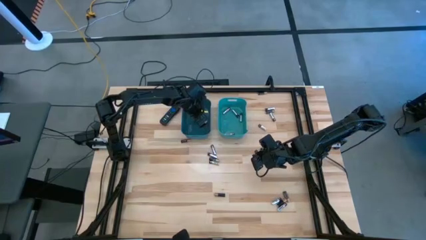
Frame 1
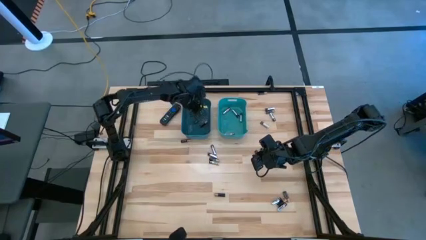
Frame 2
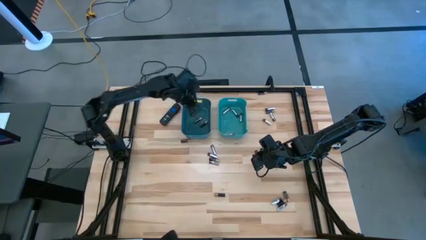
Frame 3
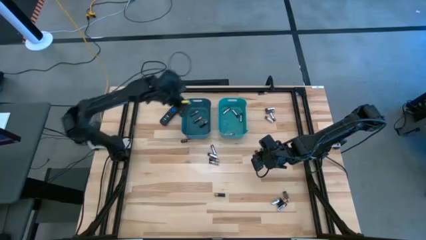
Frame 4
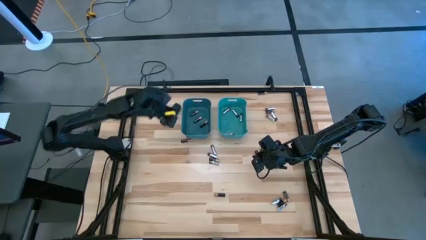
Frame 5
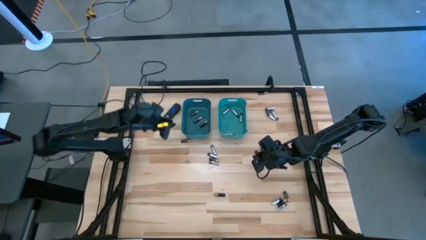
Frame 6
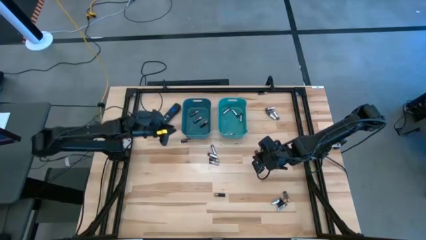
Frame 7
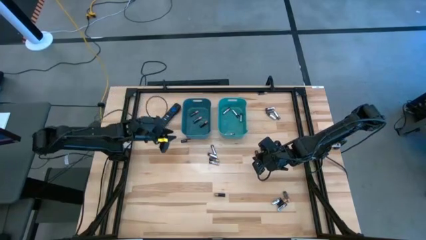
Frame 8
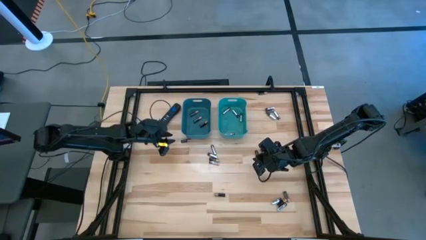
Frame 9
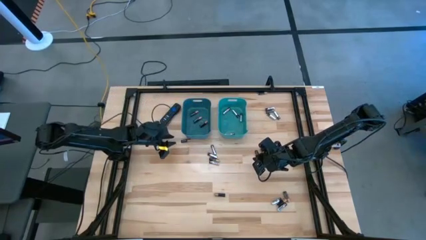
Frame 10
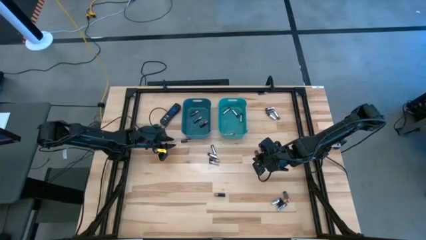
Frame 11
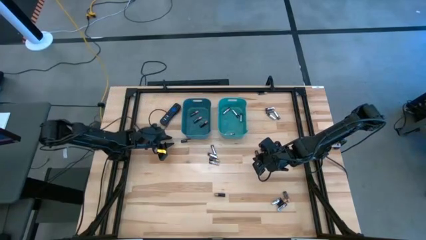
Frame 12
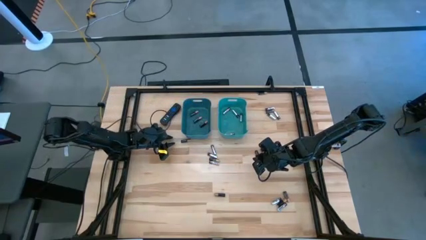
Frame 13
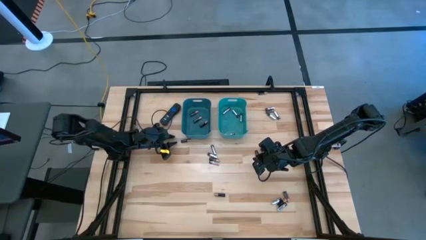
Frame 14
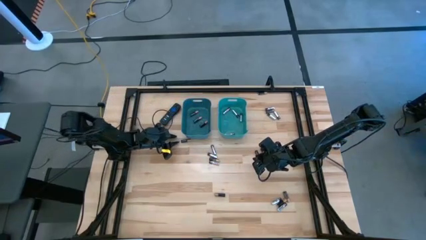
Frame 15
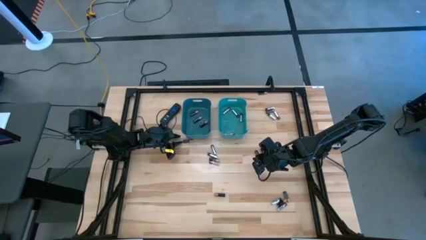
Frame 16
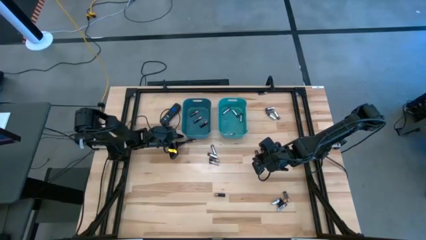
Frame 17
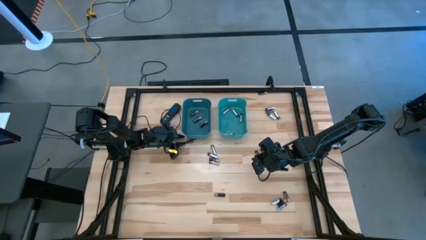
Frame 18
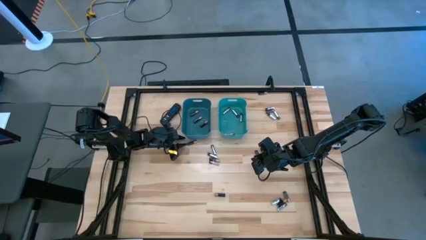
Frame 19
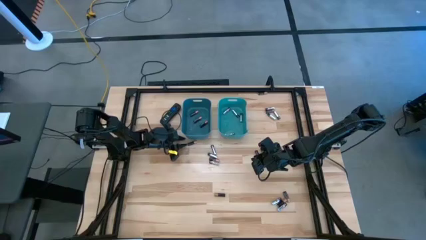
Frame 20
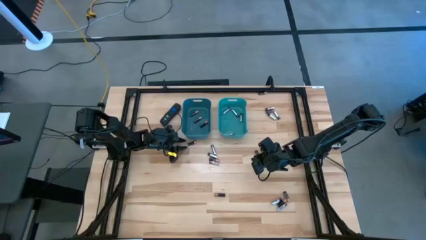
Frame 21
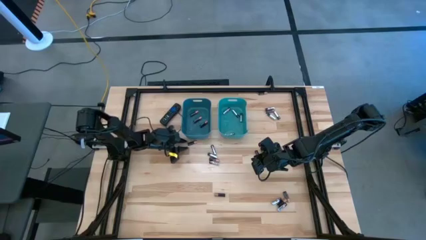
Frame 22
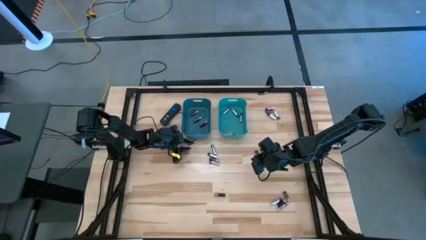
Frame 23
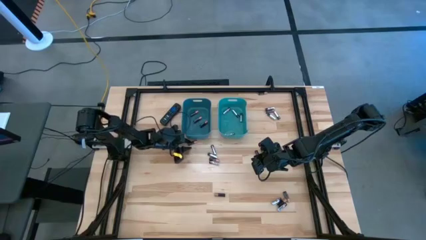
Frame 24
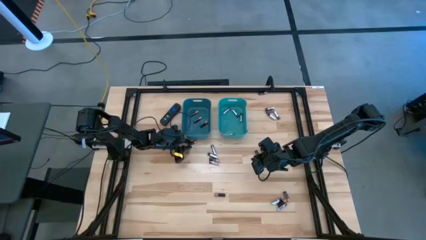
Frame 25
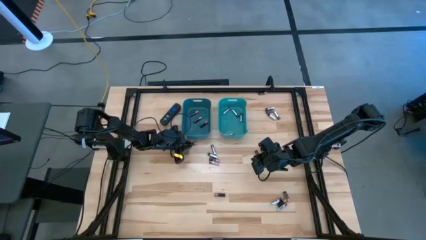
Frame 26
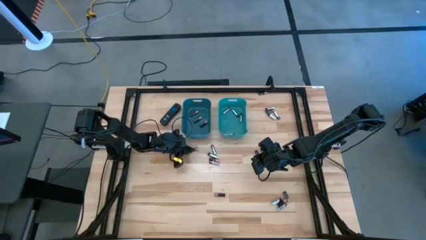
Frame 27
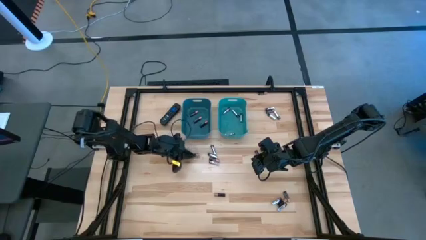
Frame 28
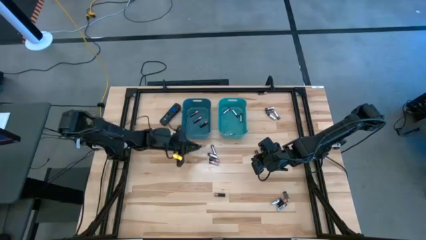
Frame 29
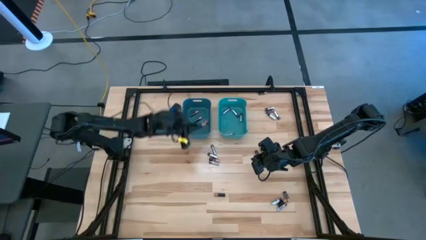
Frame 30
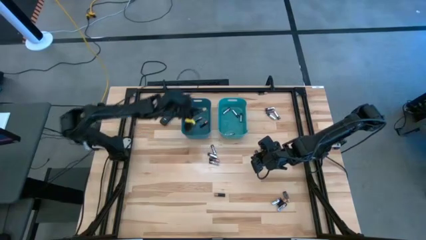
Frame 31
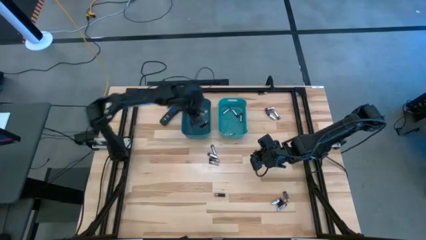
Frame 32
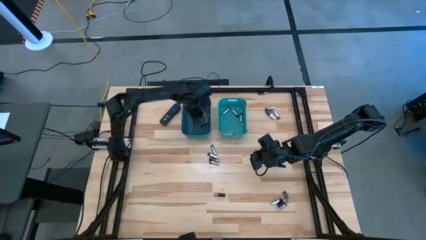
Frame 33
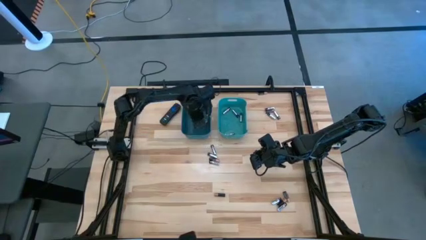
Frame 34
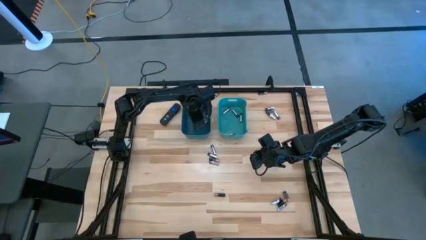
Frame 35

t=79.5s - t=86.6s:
Task: Sort batteries
Put the black battery into the blue bin

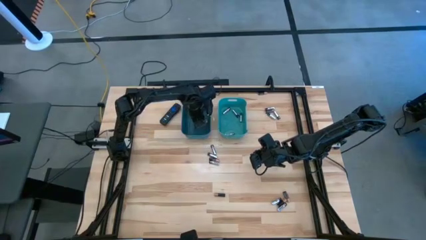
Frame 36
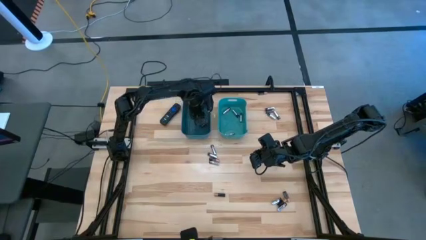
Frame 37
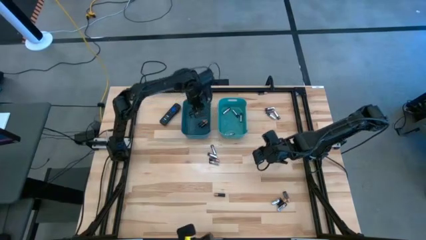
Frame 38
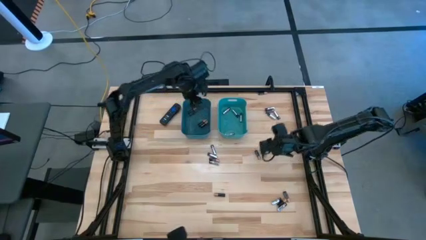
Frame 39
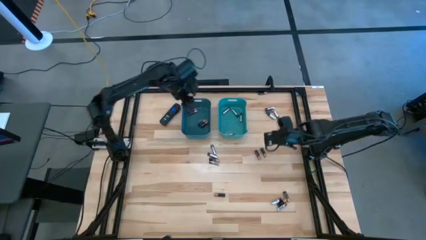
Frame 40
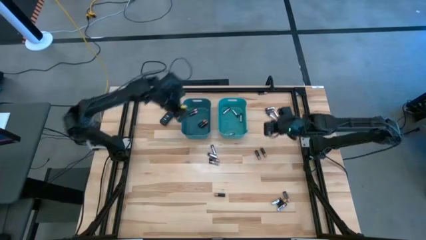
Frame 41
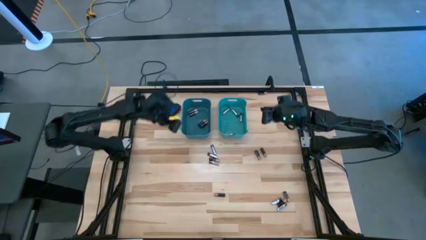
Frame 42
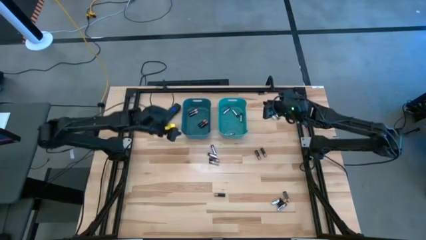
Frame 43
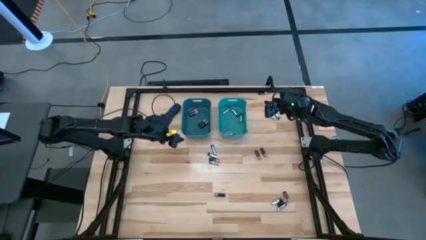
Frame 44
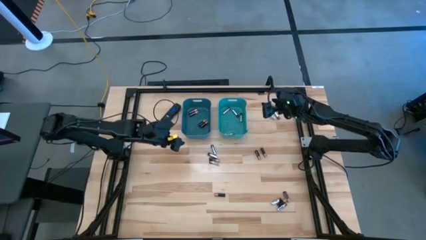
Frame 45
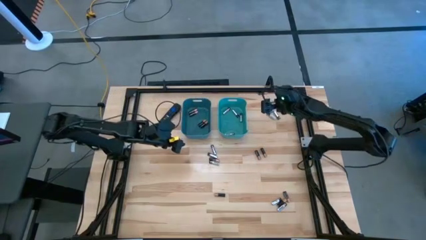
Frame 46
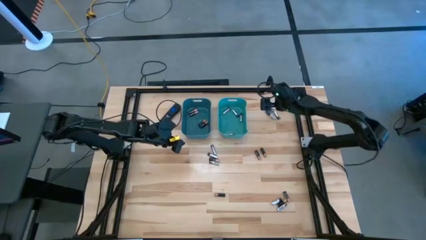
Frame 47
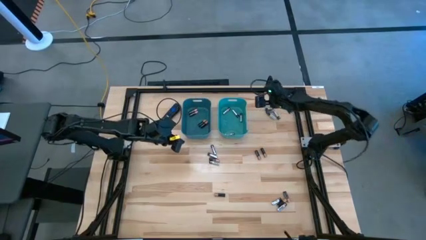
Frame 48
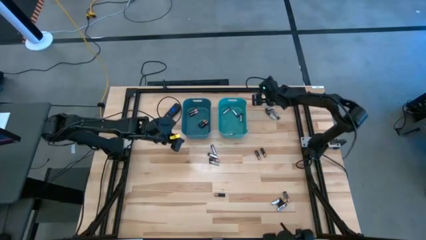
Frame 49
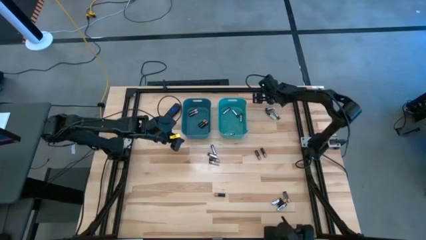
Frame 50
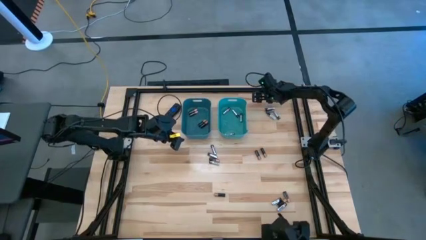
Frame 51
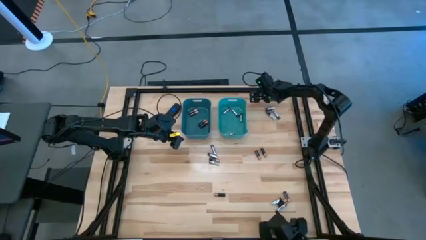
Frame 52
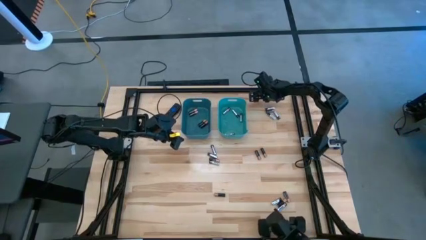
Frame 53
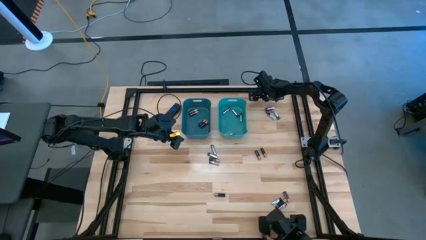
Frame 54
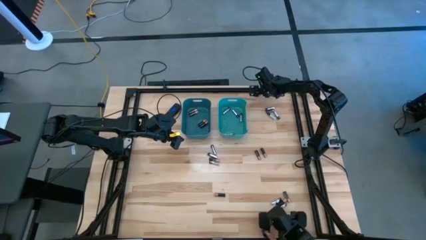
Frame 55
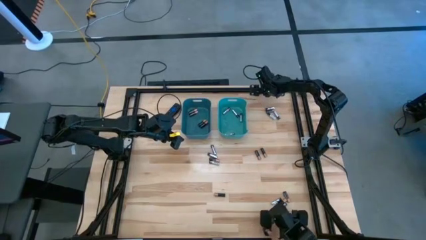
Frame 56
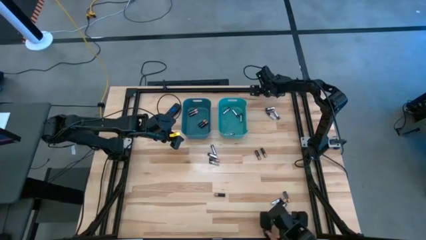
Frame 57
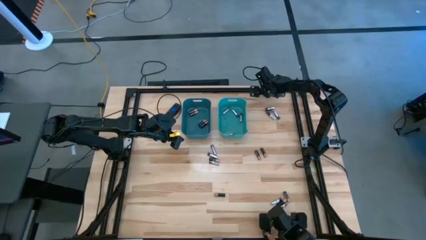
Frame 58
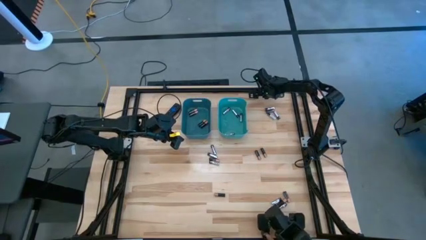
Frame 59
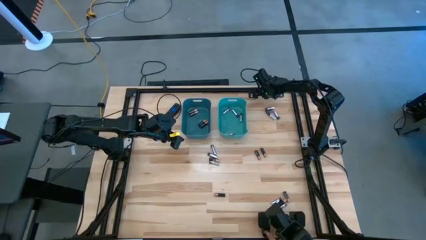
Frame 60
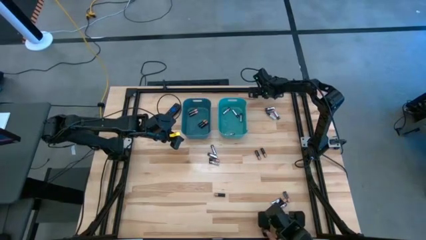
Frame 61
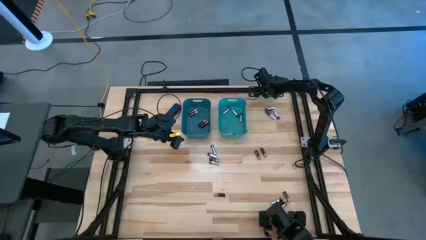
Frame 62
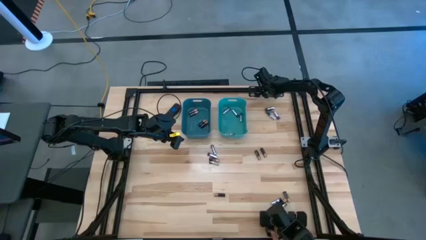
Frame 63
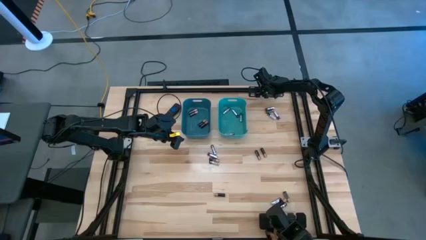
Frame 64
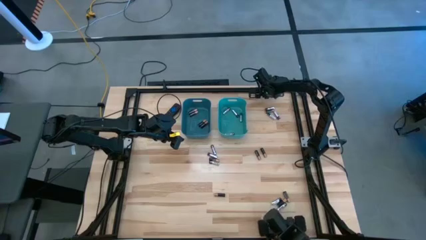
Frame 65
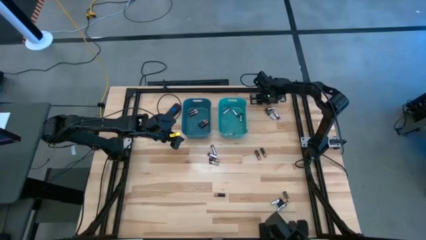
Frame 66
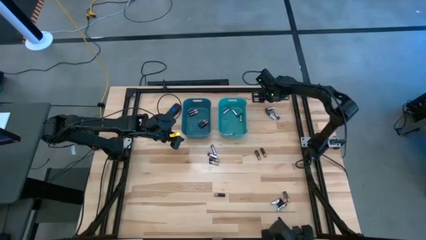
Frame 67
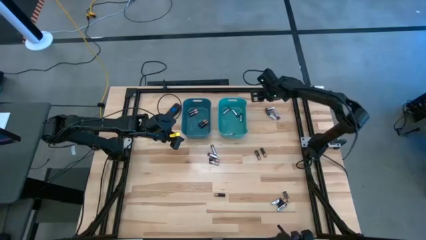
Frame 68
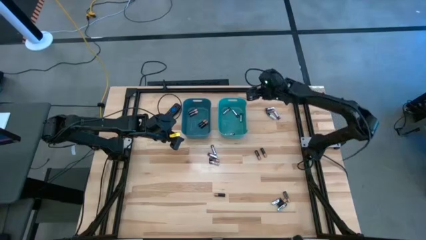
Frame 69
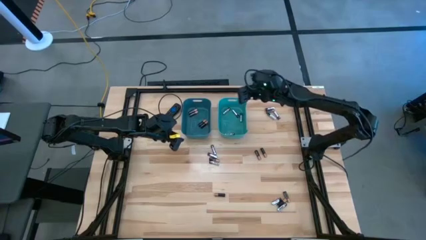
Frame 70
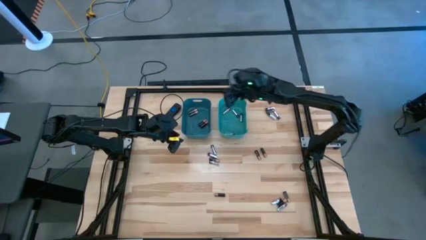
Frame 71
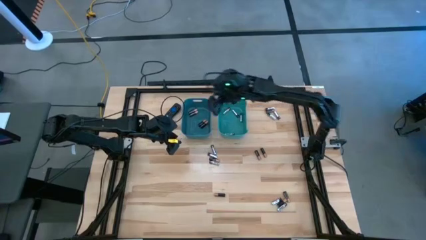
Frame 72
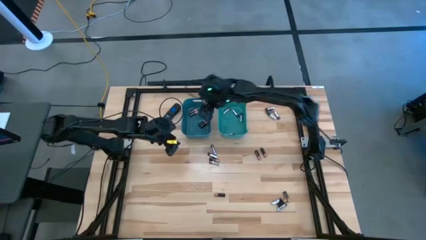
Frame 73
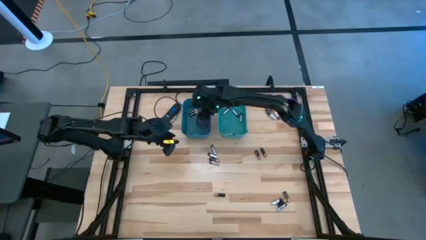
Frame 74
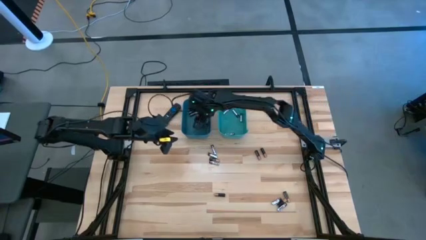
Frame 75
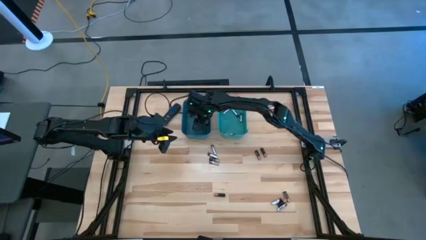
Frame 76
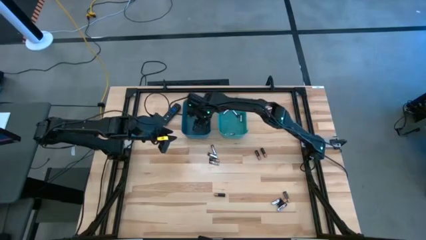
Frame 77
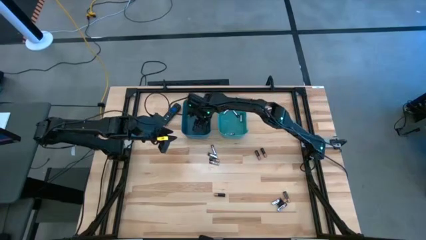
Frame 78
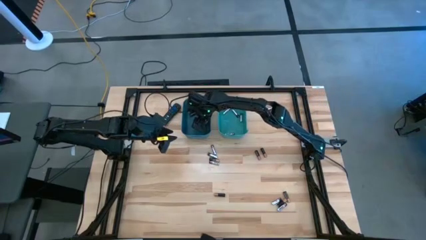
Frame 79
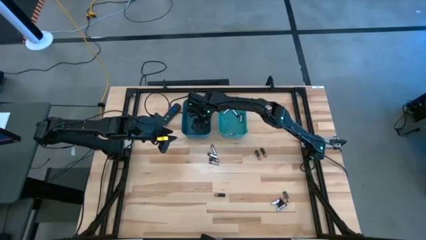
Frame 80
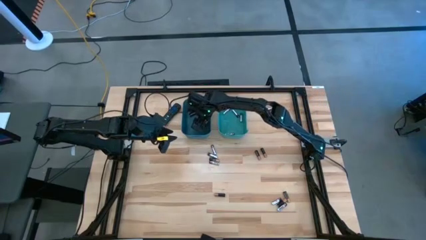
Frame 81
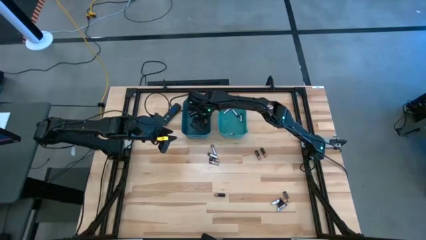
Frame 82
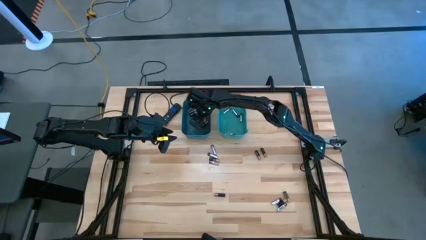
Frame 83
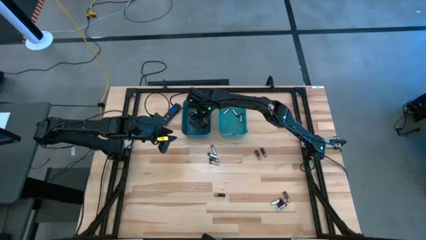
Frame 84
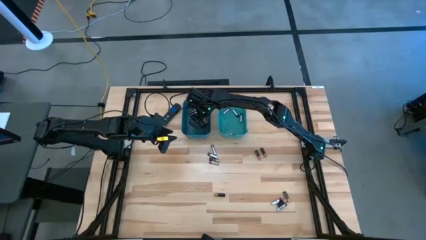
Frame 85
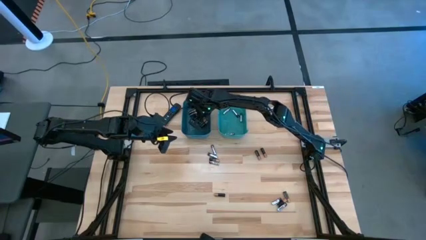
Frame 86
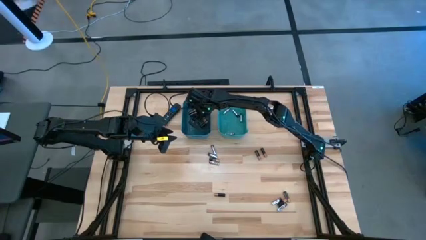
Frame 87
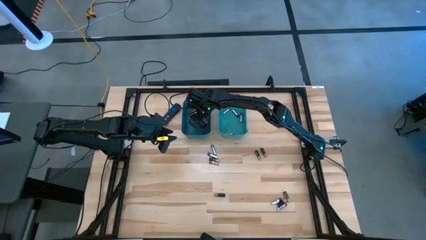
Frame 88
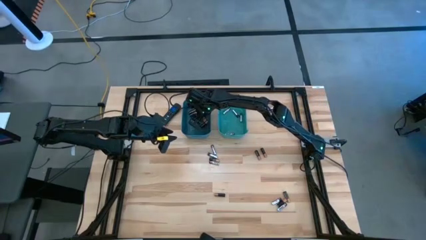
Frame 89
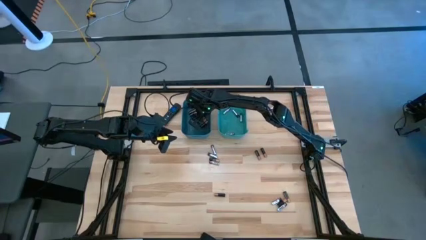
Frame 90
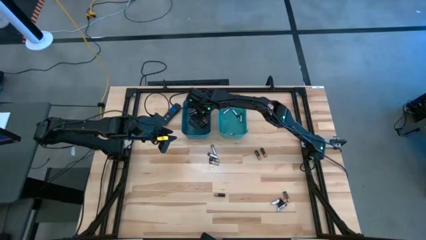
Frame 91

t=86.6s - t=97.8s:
Put the black battery into the blue bin
